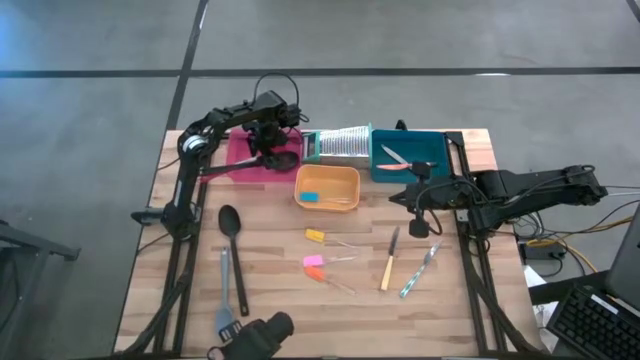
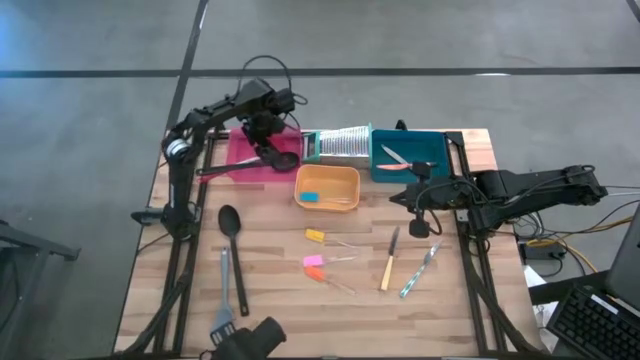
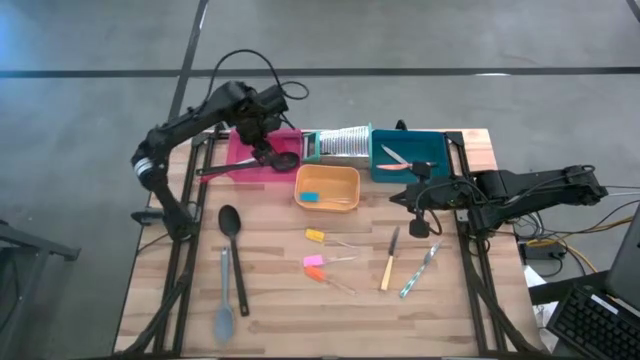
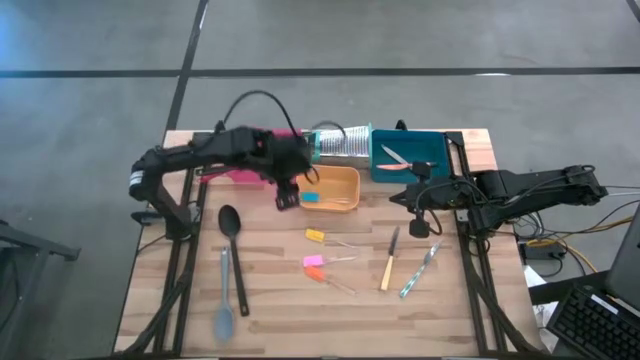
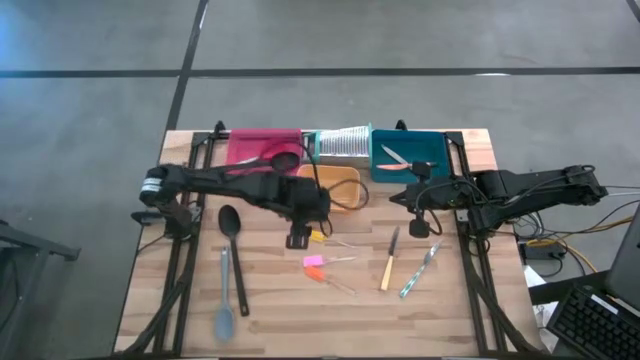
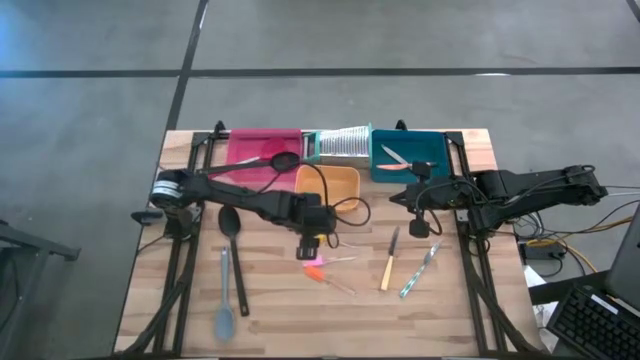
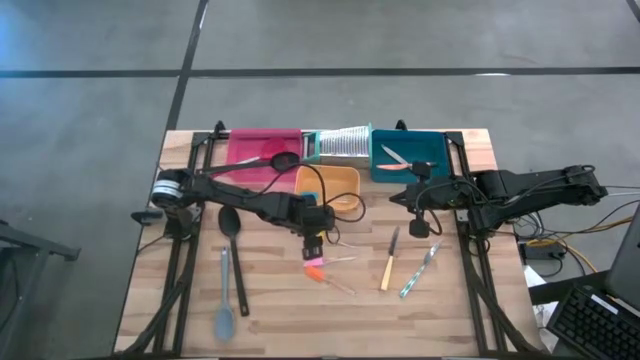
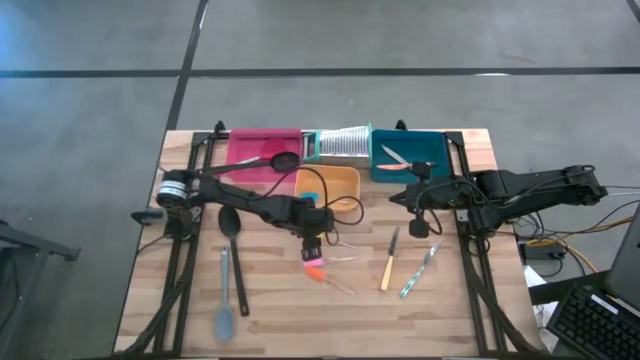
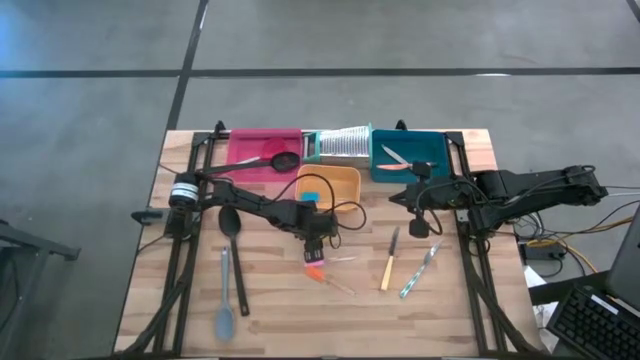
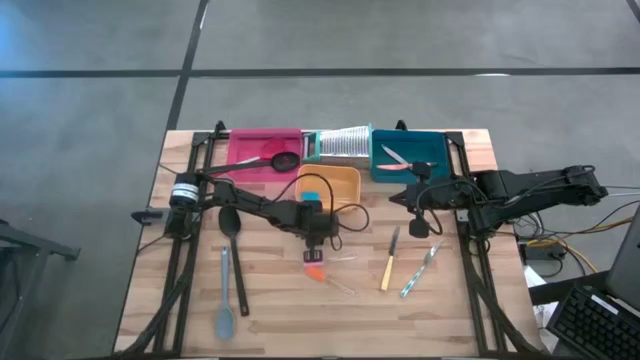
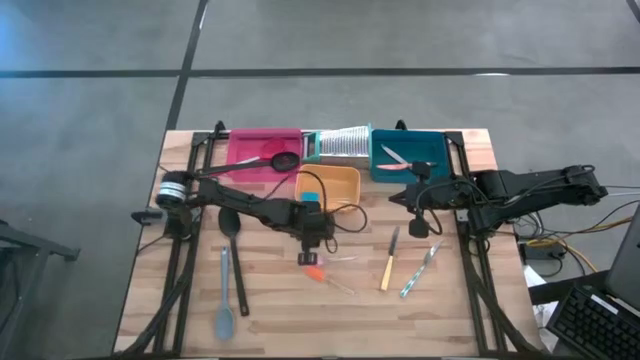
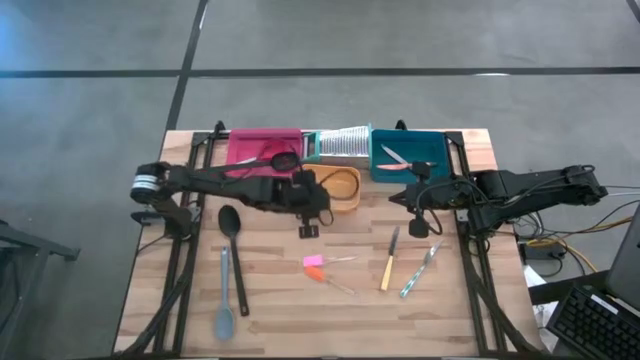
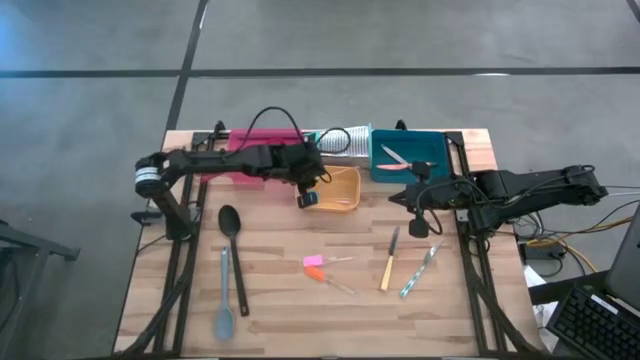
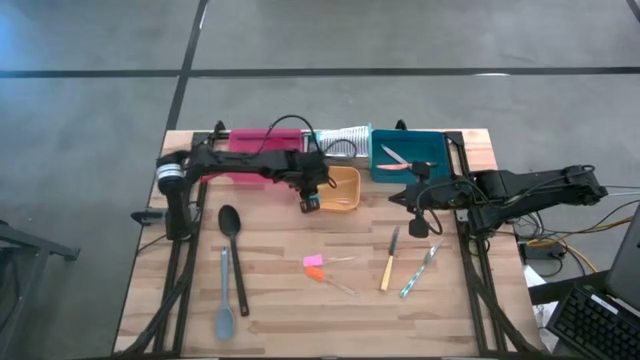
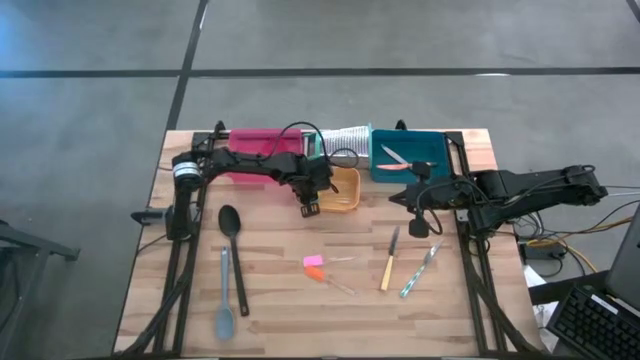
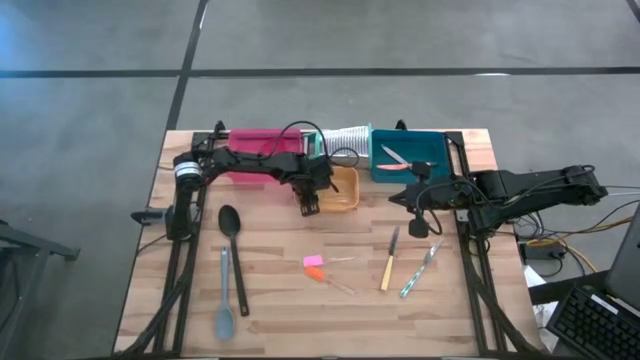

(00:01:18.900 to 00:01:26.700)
Task: Pick & Place Kitchen Items
Put the yellow spatula into the yellow bin

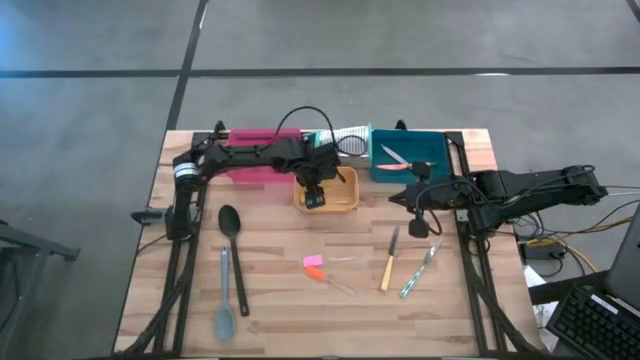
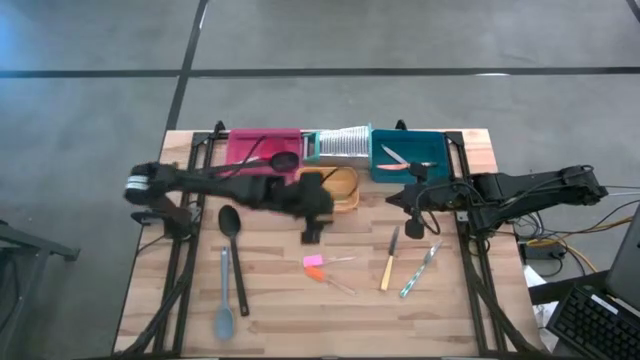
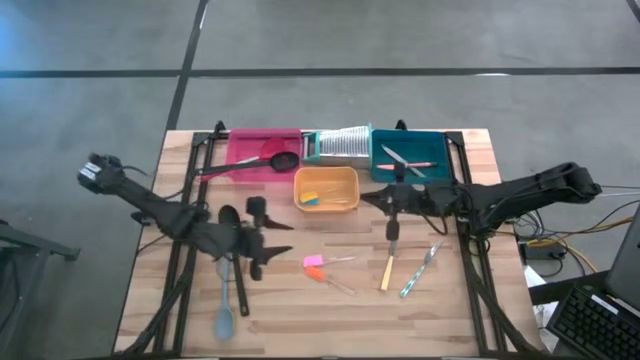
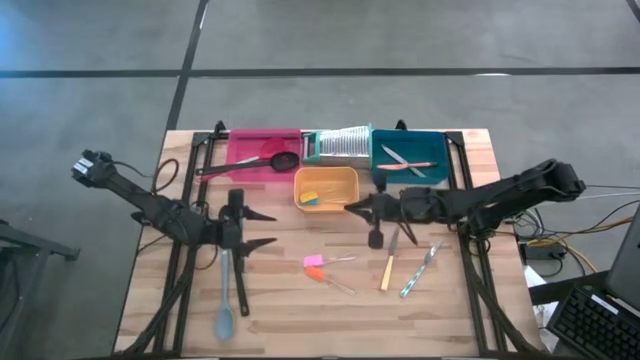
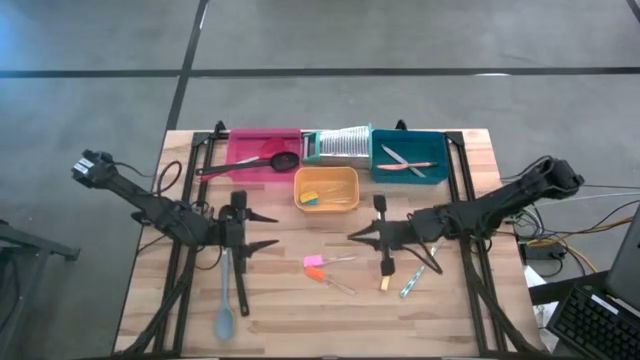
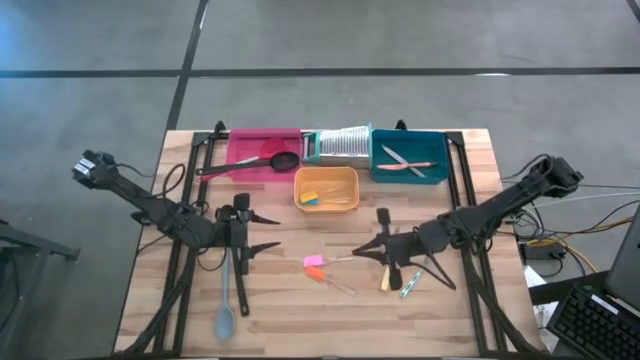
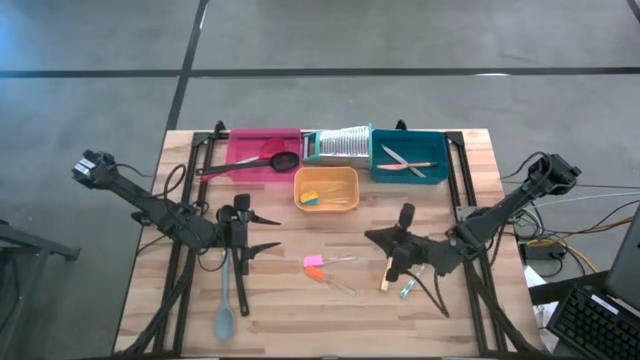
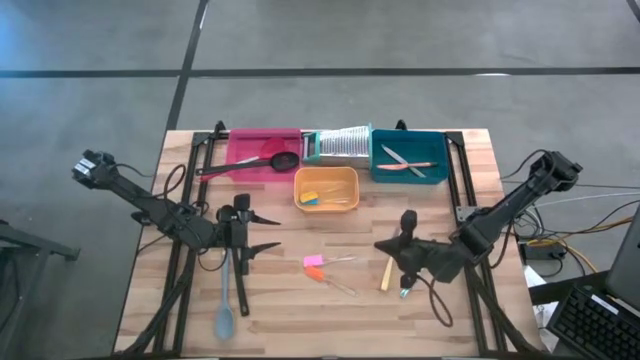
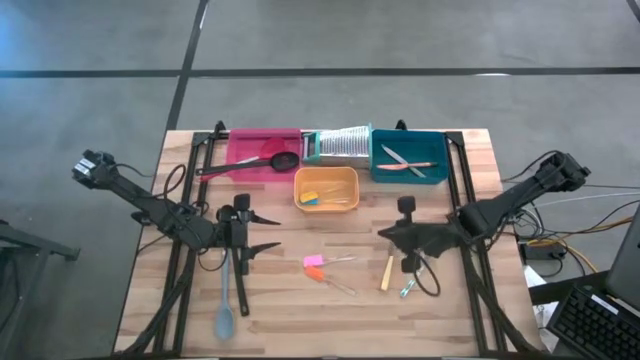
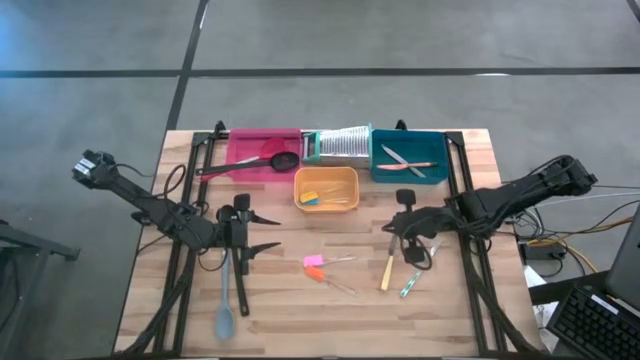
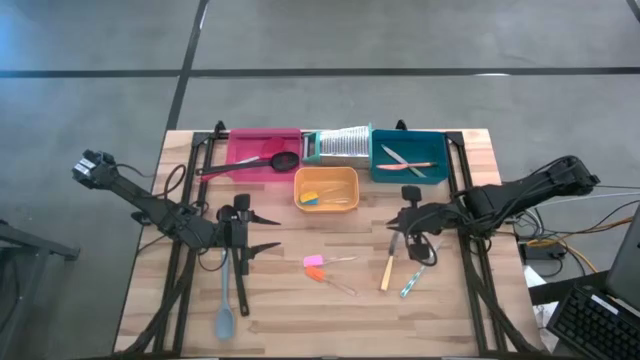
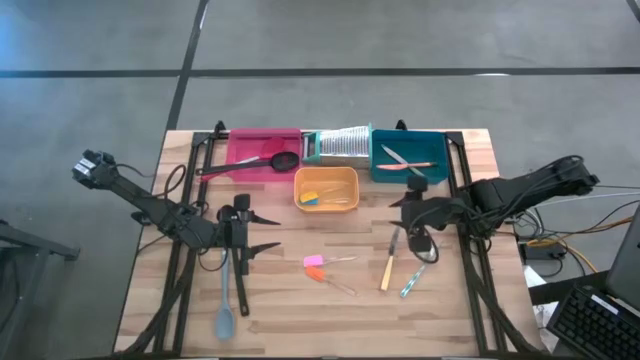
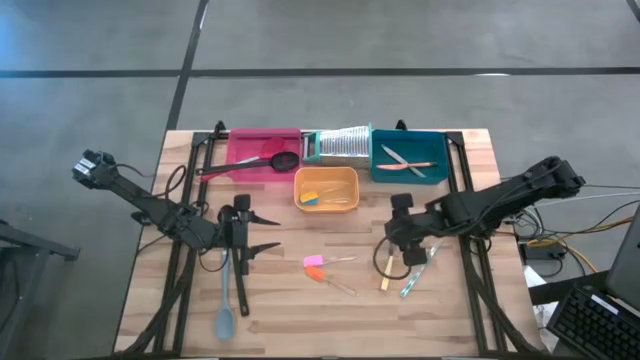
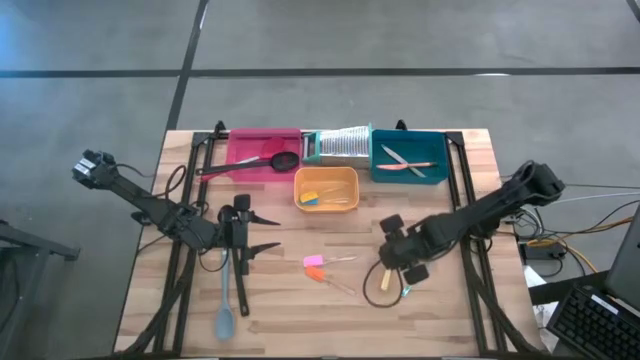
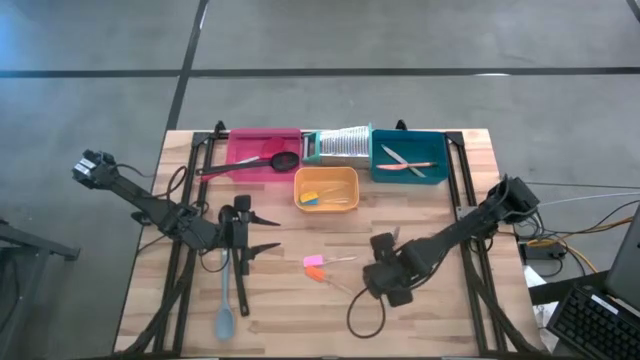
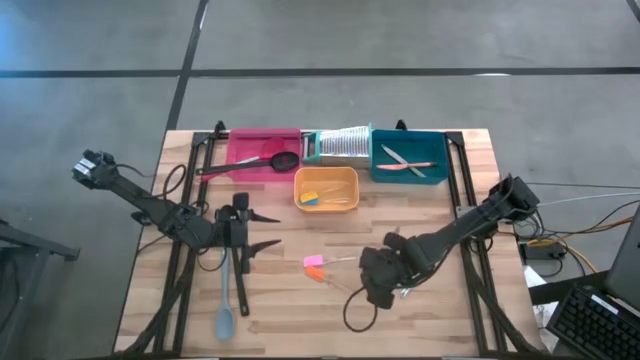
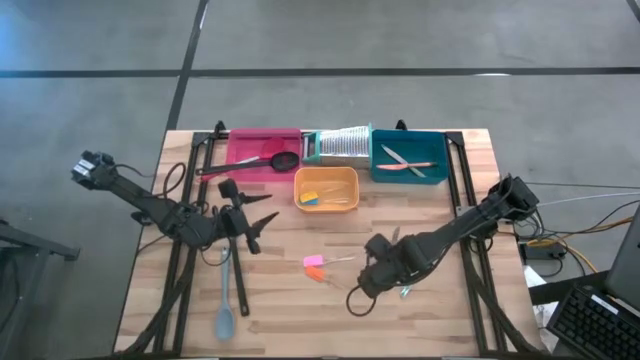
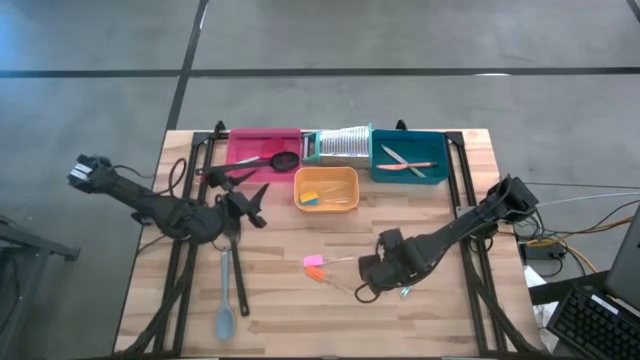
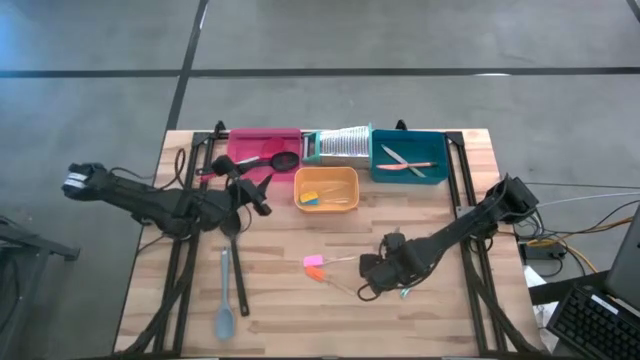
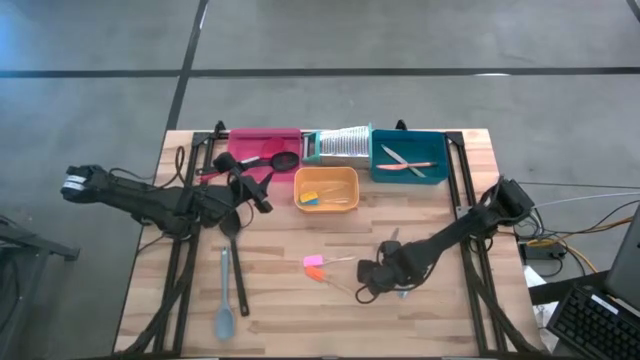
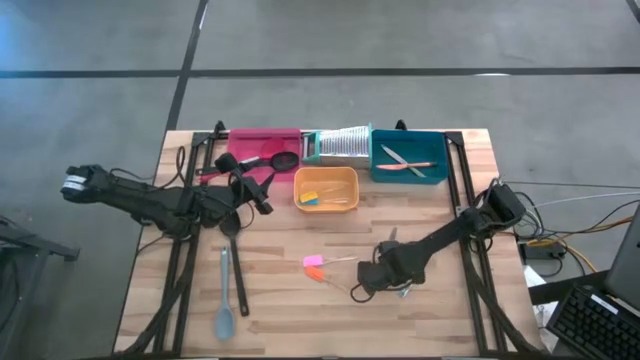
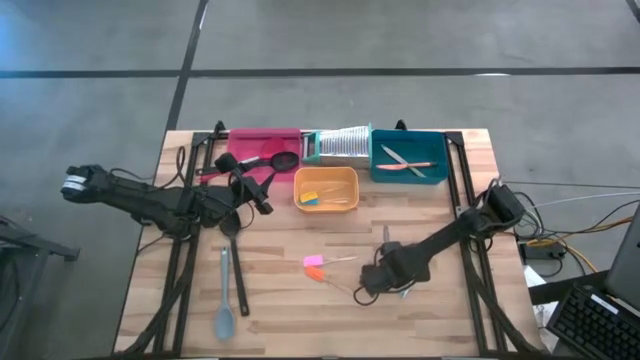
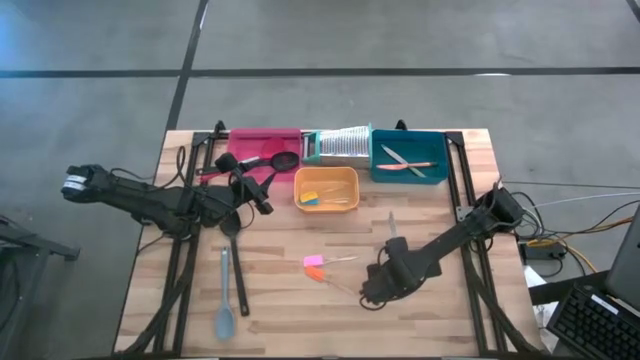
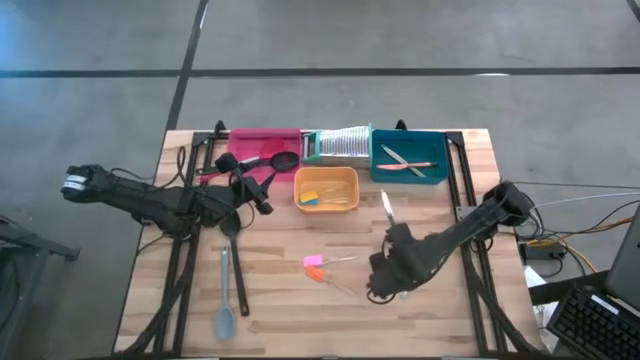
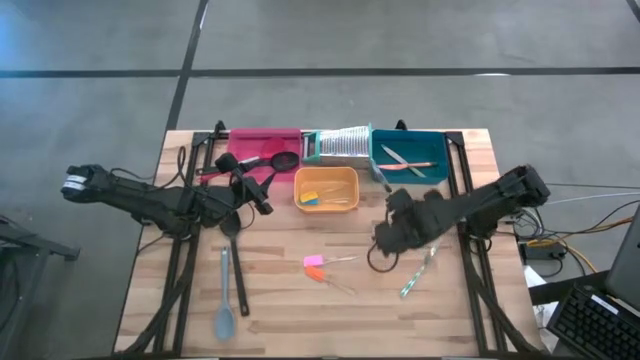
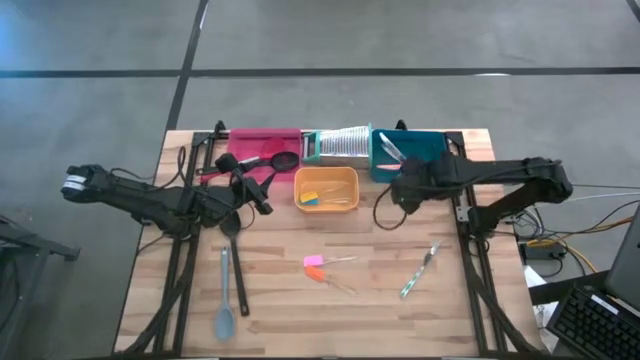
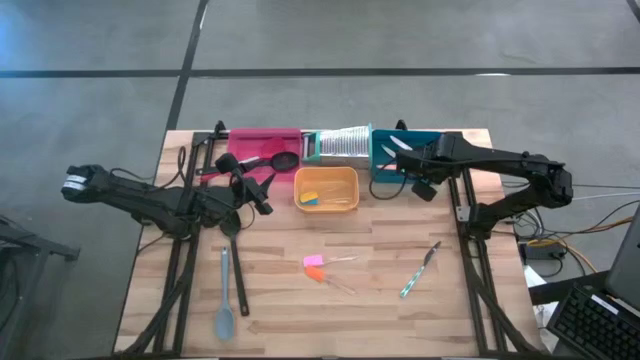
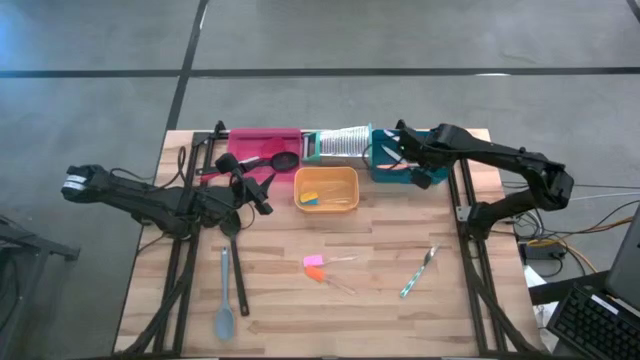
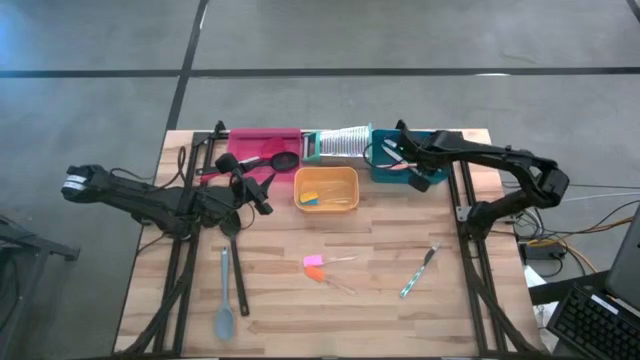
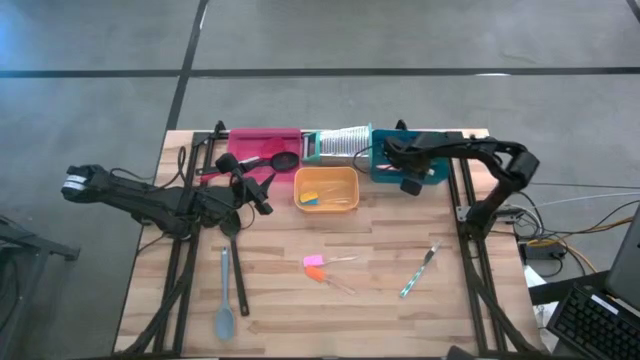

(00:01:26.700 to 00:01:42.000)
Put the yellow knife into the blue bin
